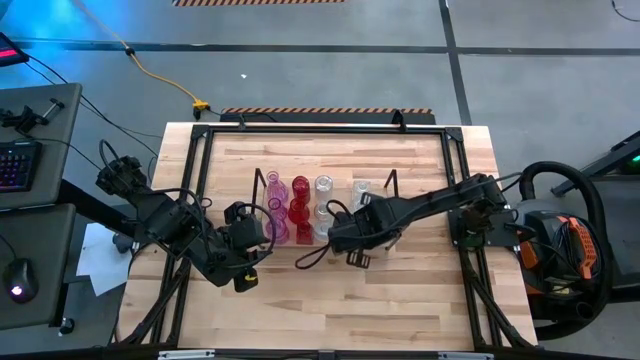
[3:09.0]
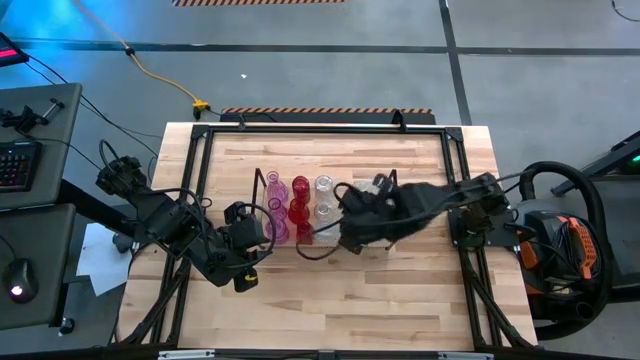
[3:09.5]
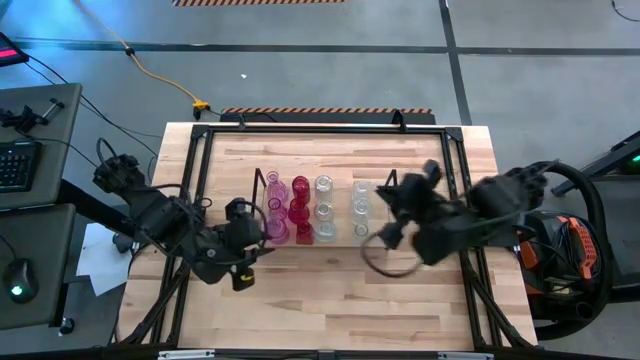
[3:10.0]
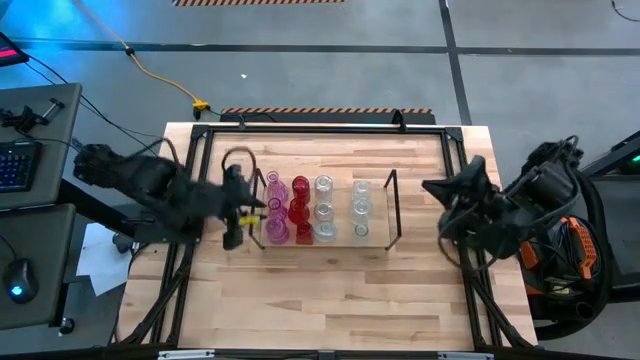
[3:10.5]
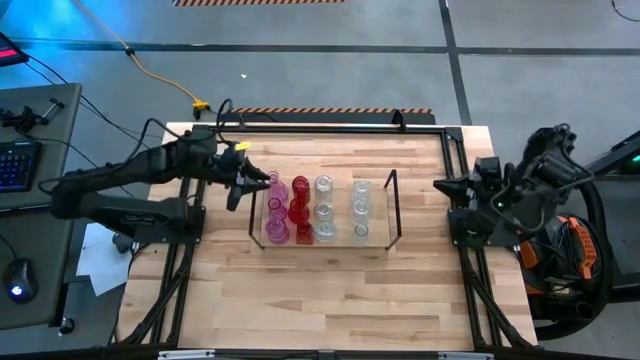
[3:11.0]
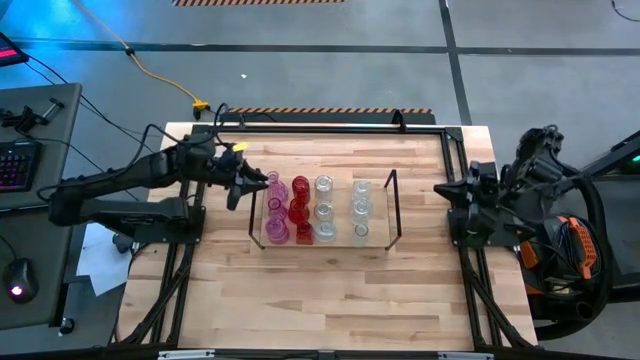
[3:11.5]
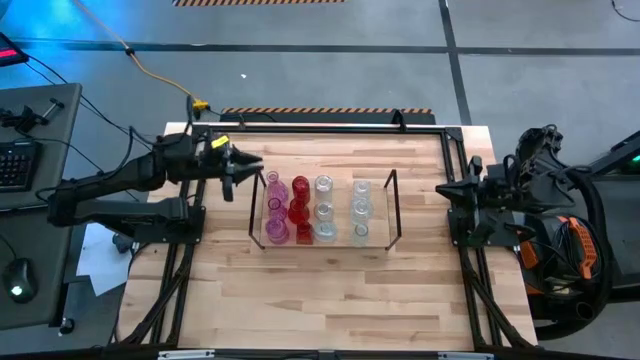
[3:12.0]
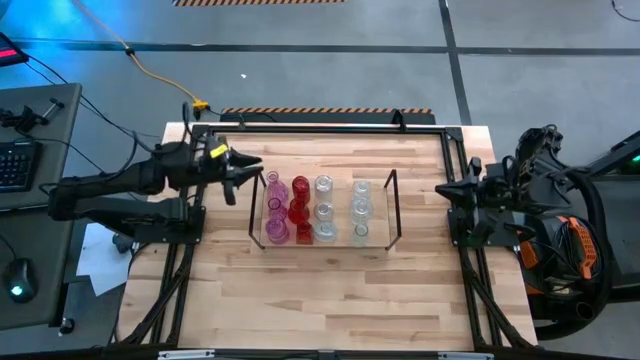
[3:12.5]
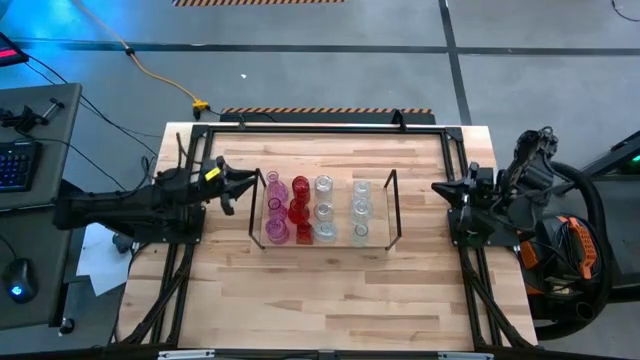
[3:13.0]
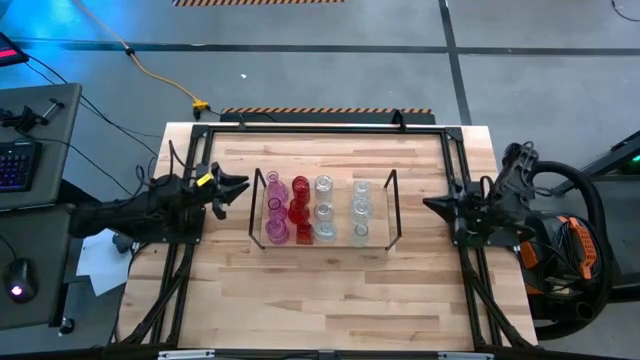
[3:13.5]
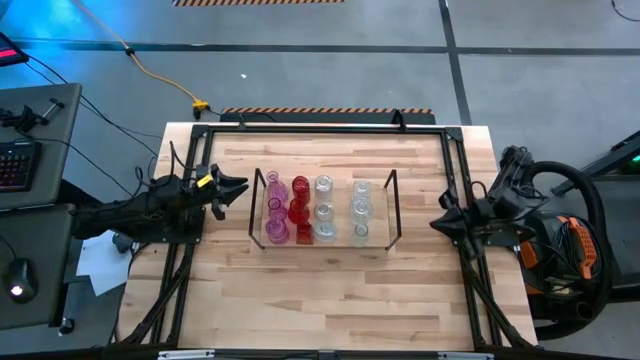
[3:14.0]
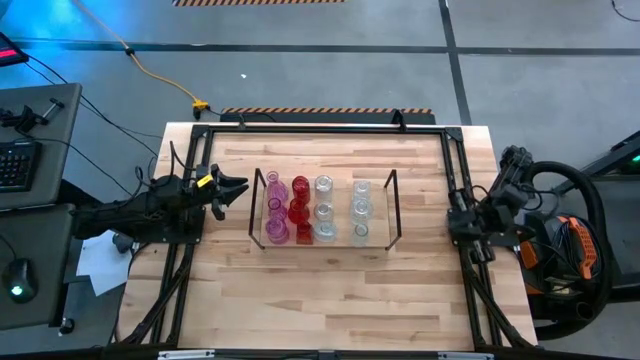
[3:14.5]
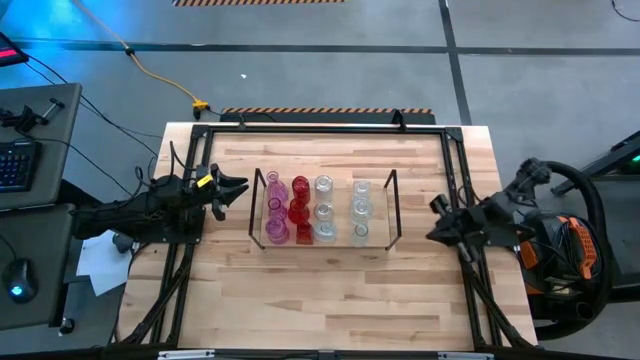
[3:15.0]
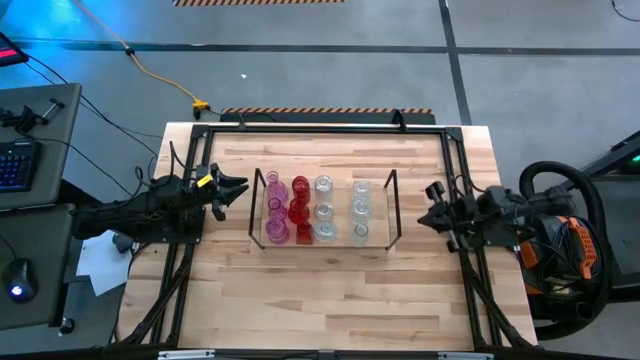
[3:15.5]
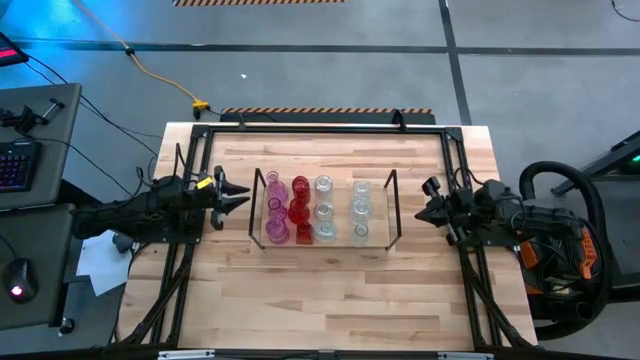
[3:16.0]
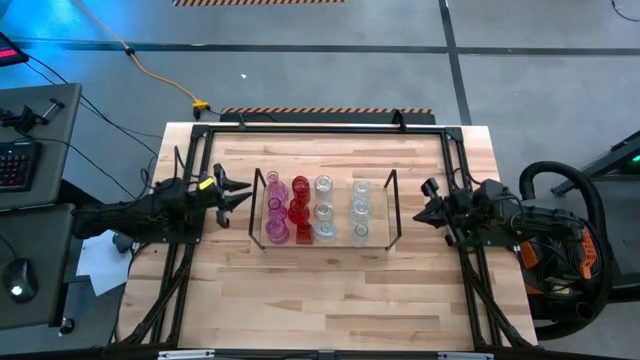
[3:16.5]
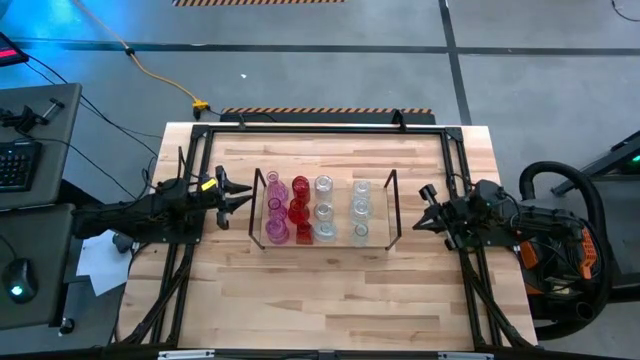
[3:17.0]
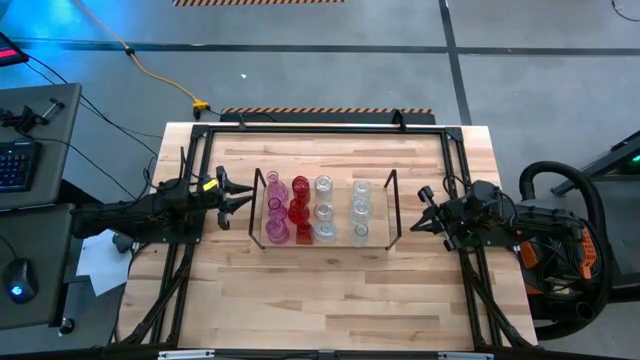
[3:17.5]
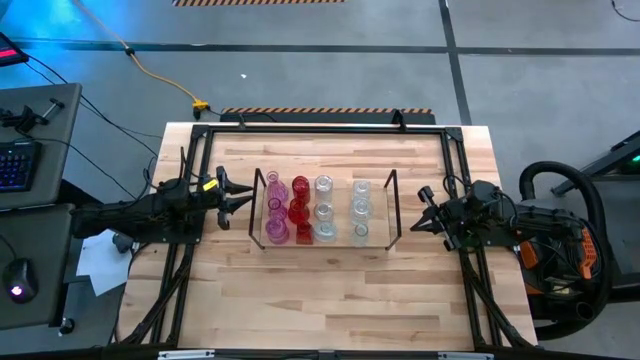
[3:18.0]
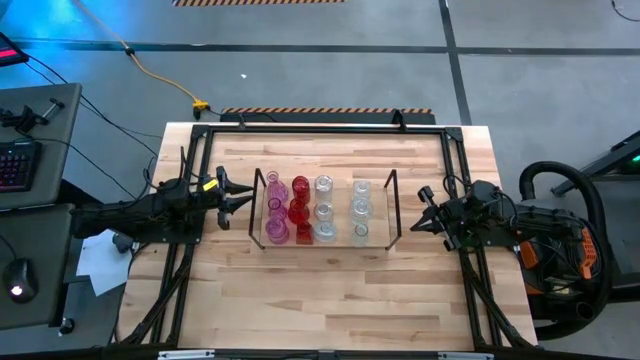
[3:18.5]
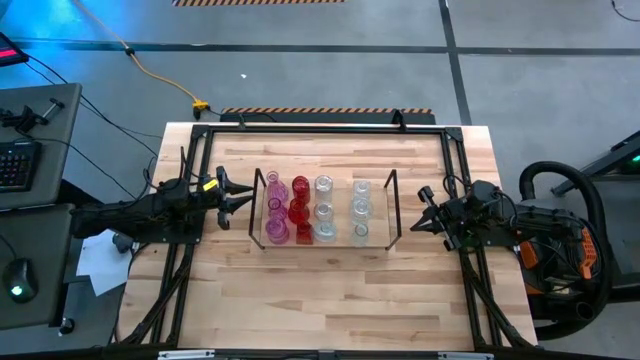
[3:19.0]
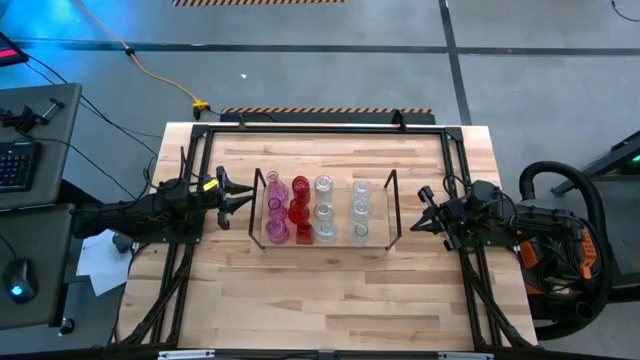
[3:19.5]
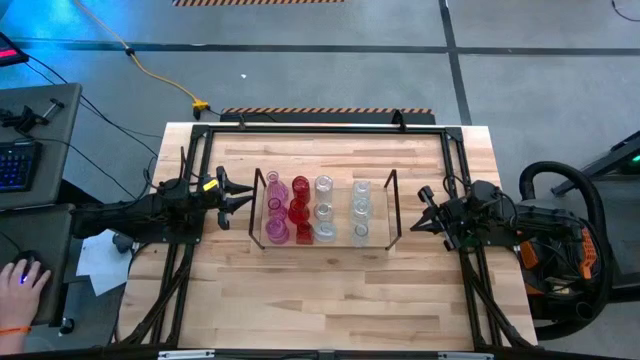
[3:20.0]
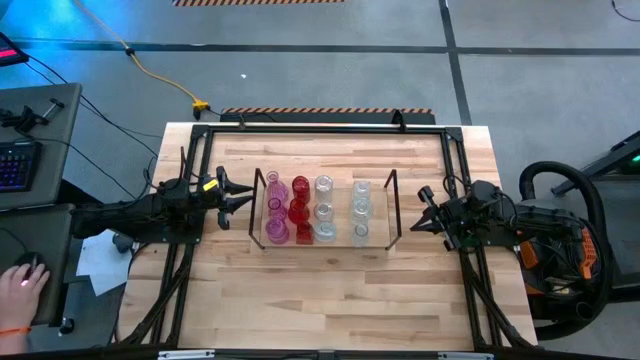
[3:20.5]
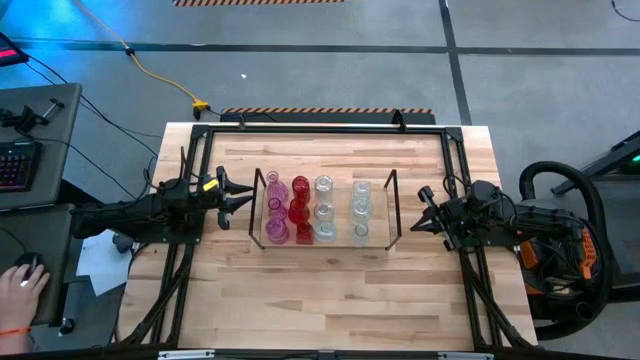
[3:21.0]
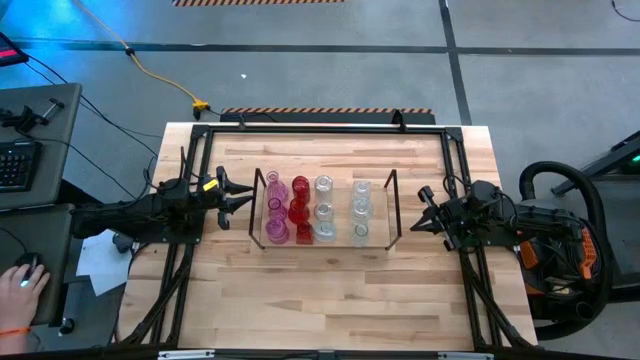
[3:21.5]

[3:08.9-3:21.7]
Task: sort vases onto shelf
Return to Home Position

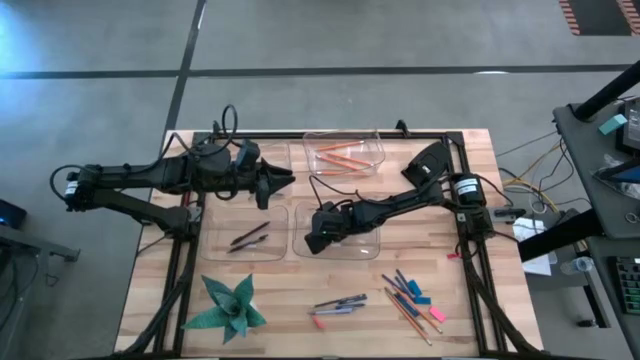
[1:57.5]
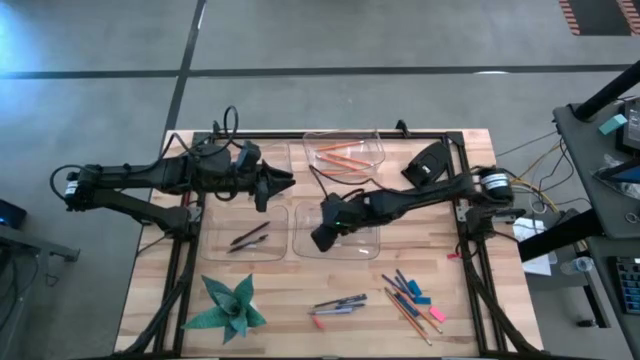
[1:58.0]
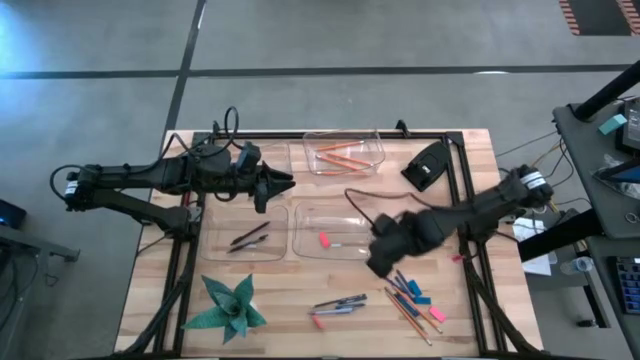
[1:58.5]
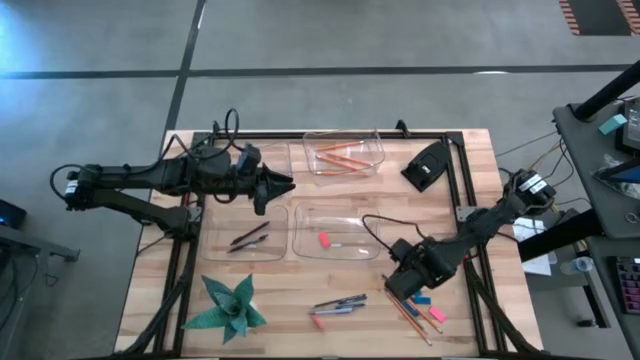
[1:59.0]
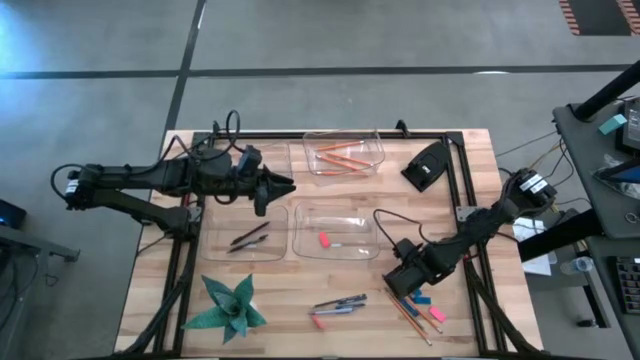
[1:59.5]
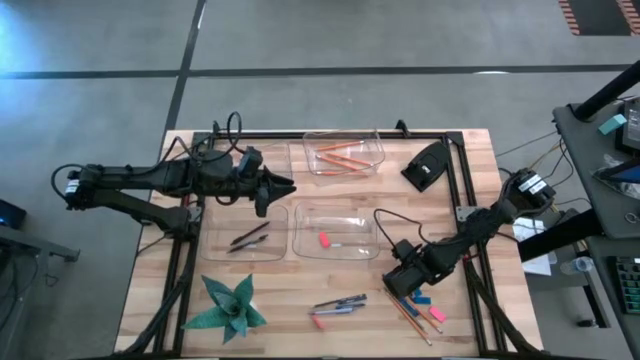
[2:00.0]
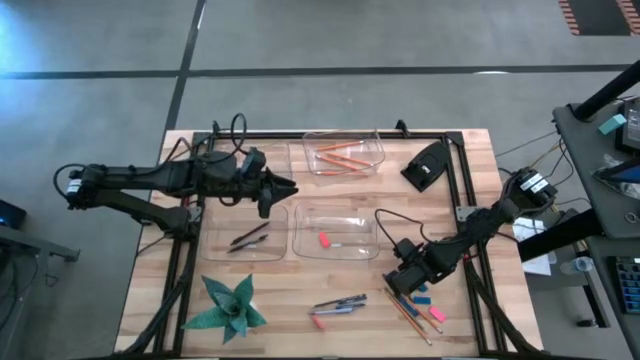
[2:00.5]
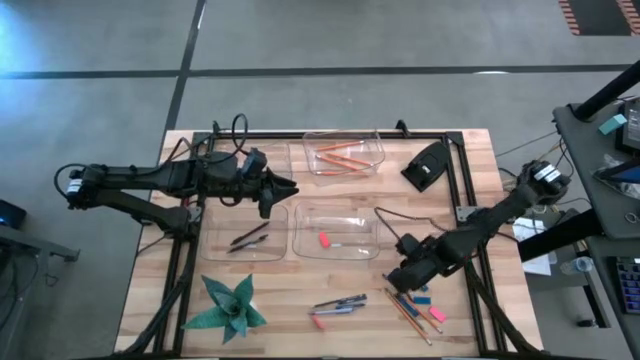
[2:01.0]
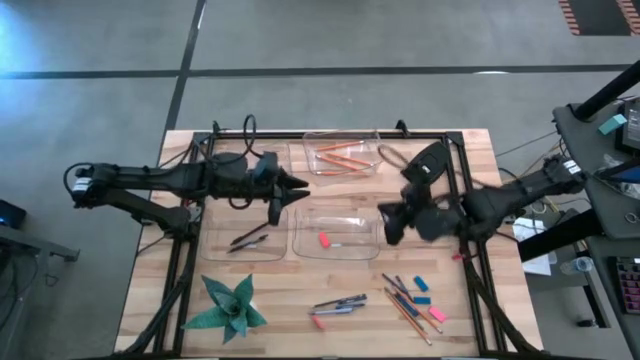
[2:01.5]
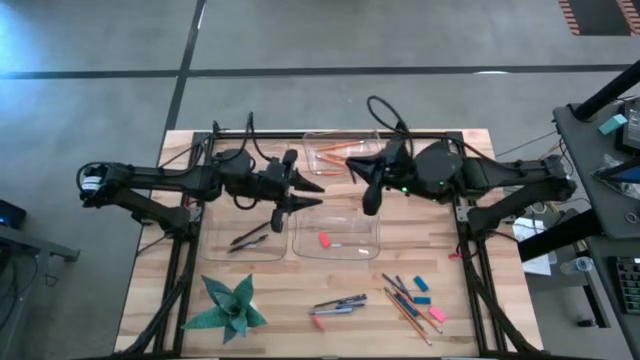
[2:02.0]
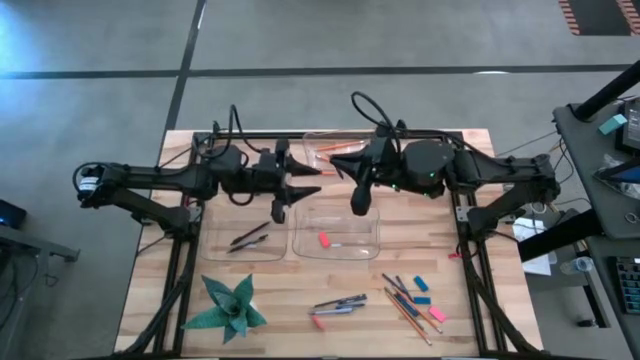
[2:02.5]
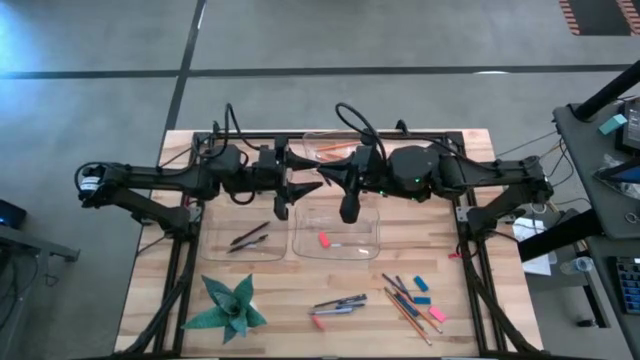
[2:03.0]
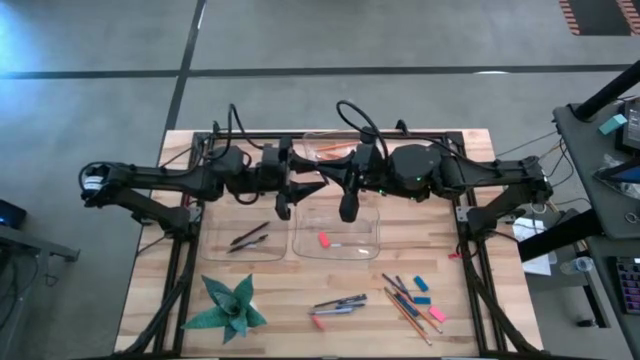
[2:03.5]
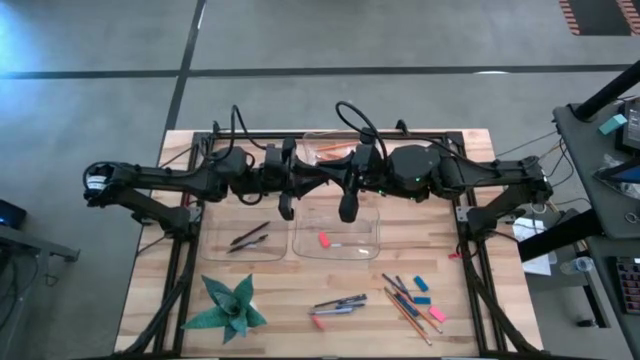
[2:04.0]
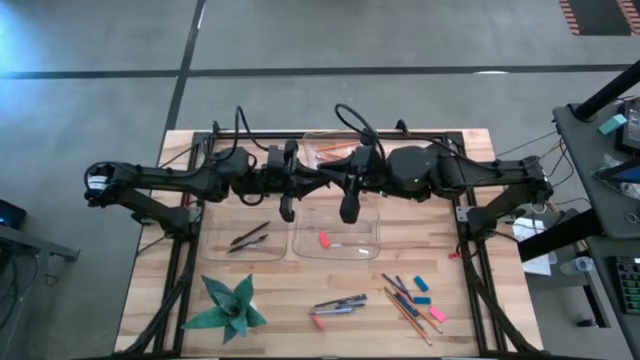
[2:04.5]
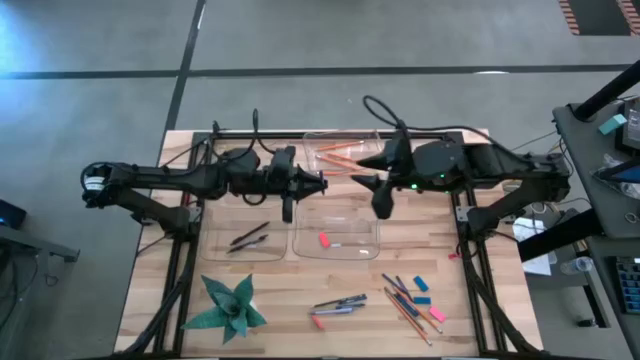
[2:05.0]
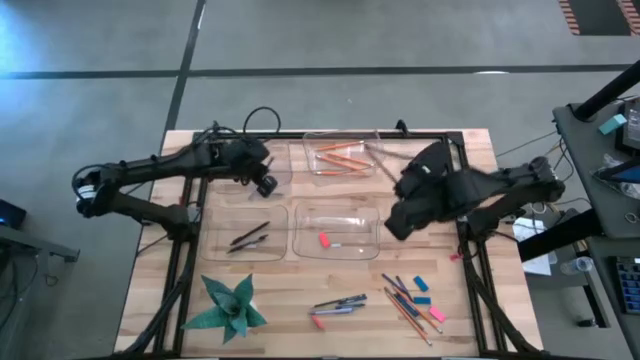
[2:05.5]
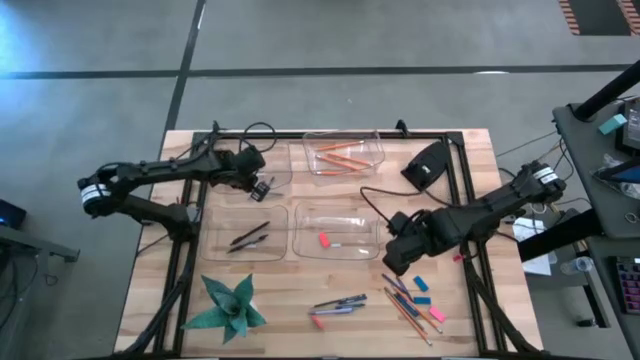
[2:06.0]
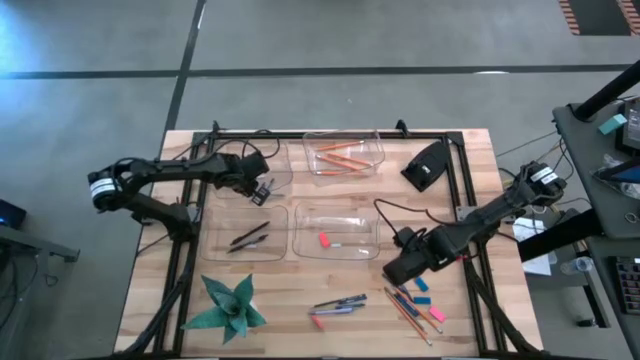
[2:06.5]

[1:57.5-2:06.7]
Task: Sort crayons/erasers/pens/pencils in bins
Put the blue crayon into the top left transparent bin
